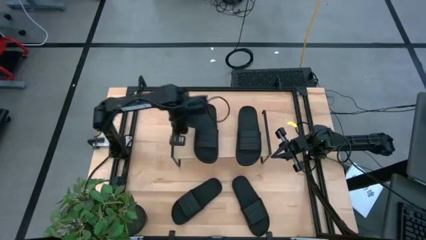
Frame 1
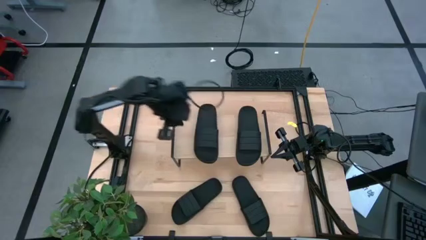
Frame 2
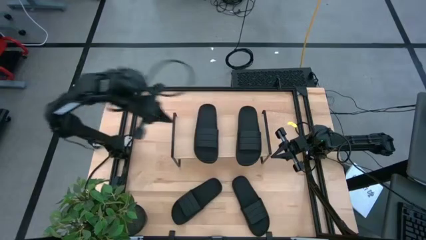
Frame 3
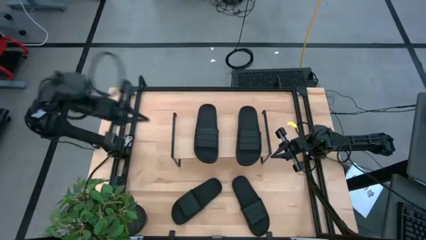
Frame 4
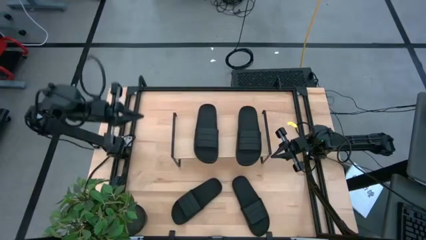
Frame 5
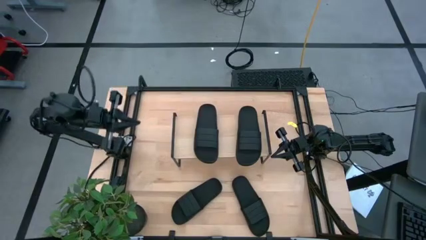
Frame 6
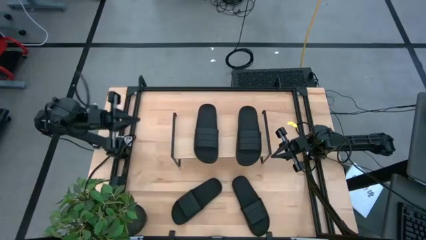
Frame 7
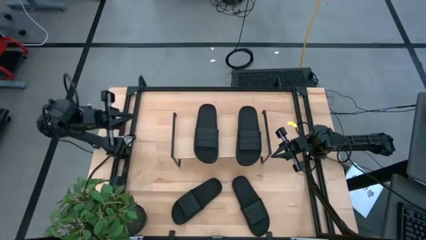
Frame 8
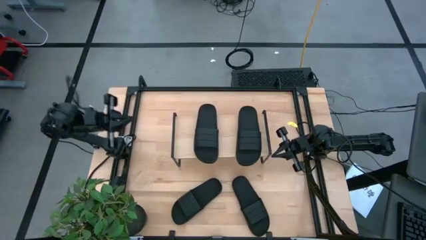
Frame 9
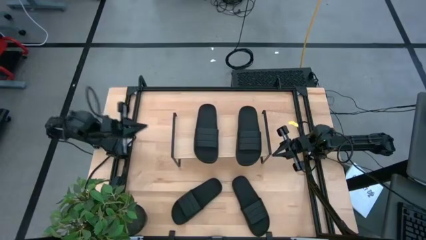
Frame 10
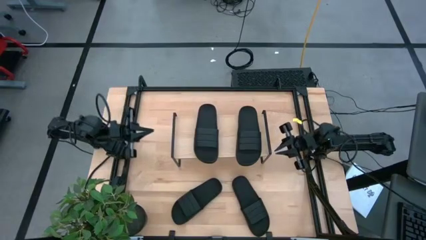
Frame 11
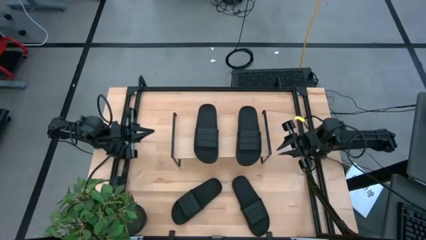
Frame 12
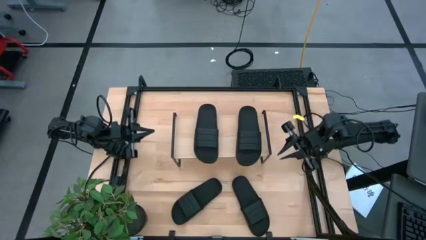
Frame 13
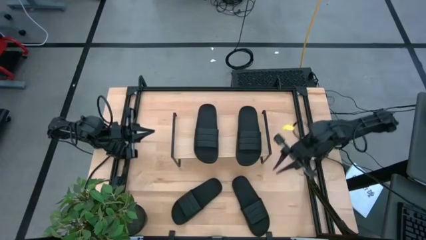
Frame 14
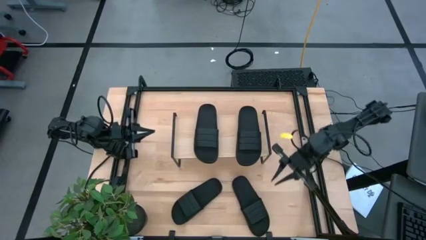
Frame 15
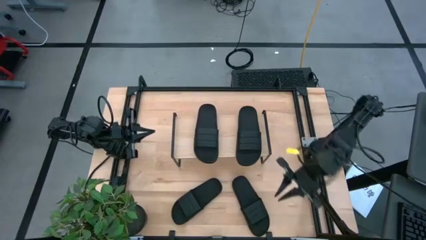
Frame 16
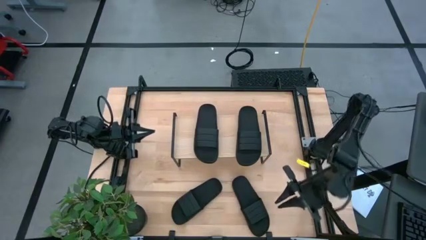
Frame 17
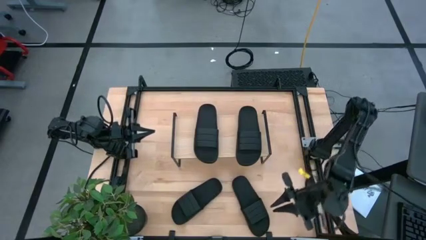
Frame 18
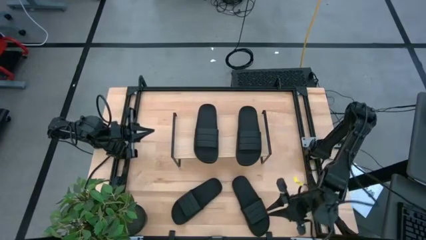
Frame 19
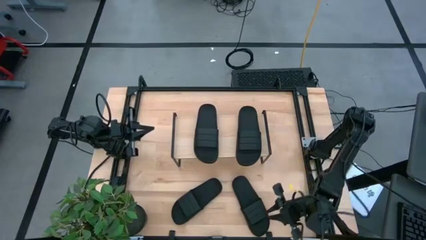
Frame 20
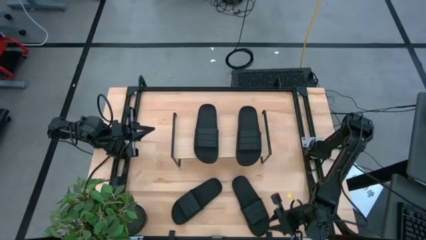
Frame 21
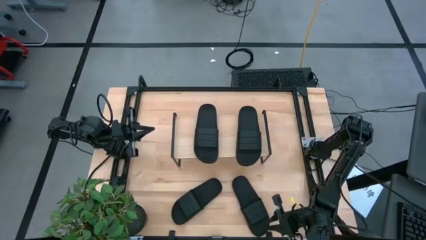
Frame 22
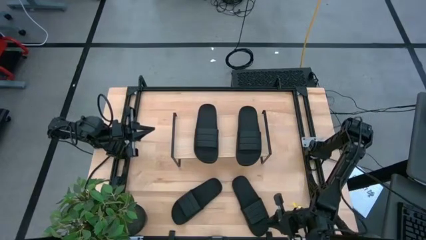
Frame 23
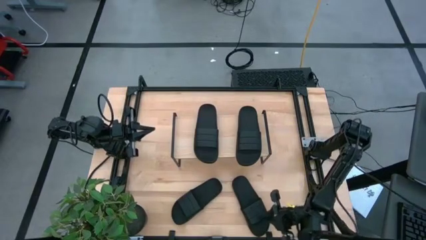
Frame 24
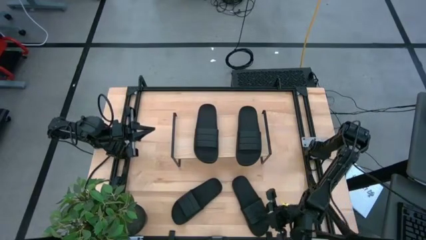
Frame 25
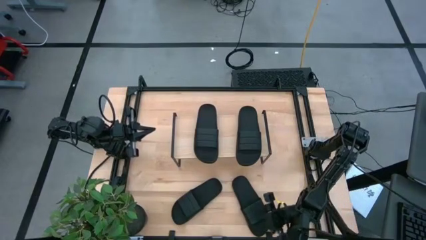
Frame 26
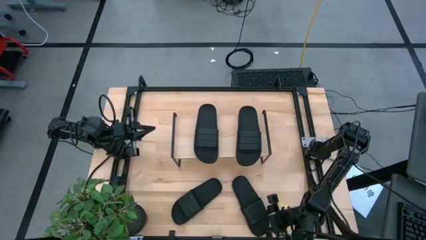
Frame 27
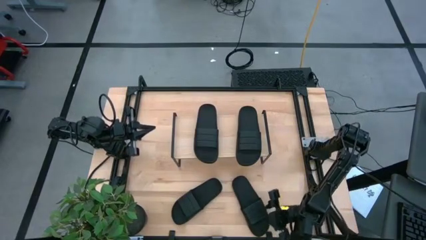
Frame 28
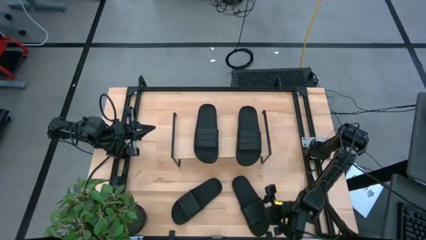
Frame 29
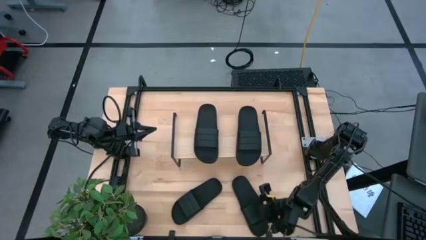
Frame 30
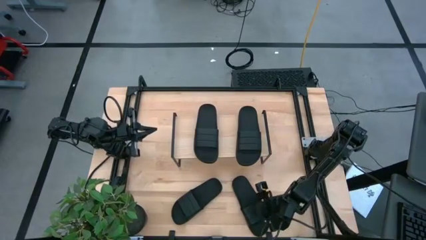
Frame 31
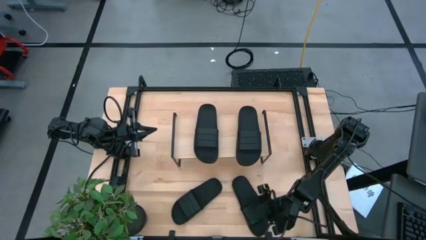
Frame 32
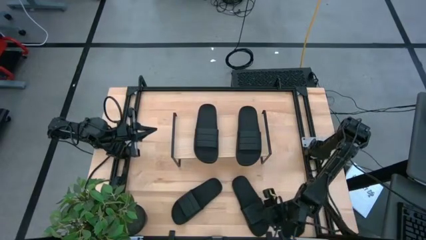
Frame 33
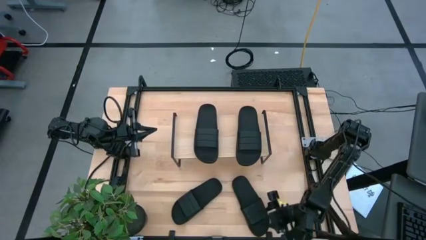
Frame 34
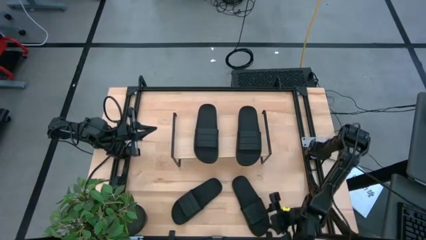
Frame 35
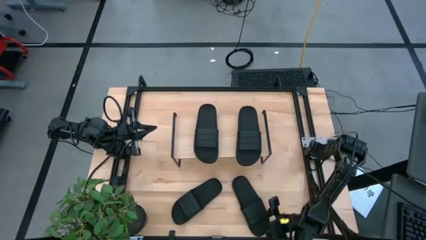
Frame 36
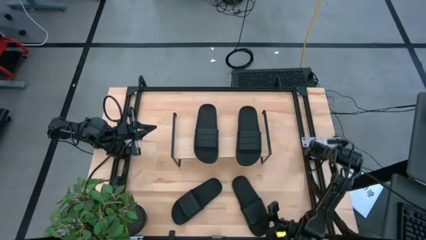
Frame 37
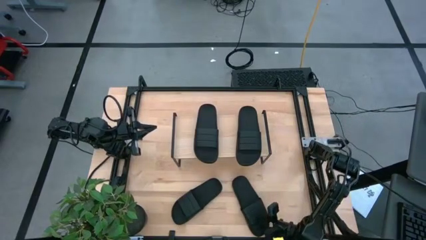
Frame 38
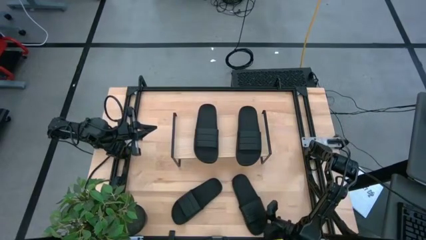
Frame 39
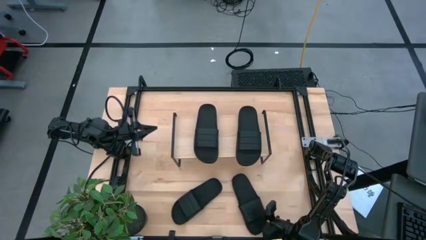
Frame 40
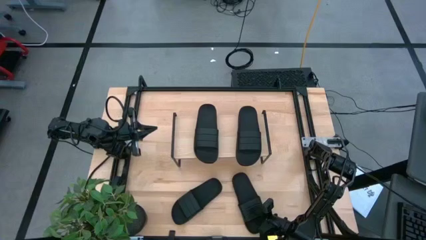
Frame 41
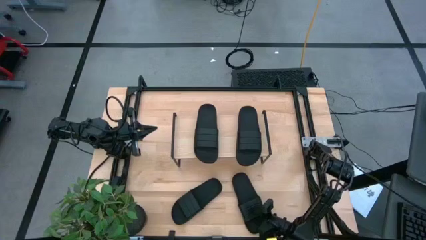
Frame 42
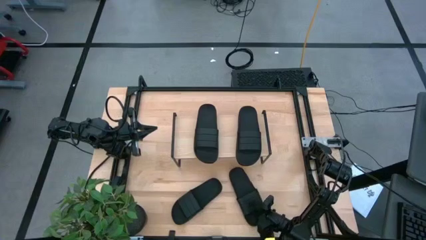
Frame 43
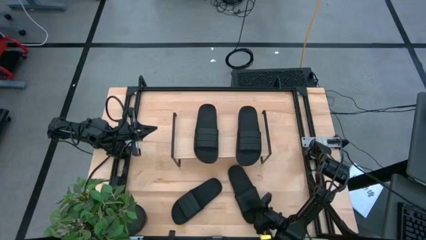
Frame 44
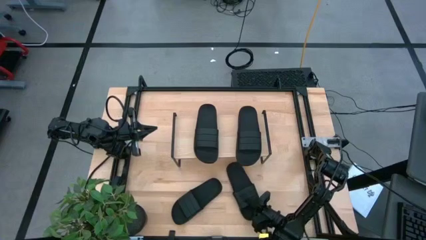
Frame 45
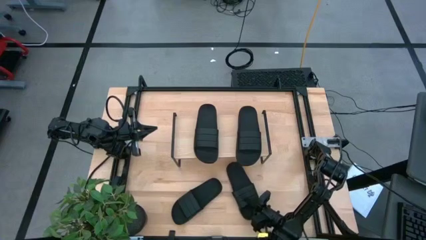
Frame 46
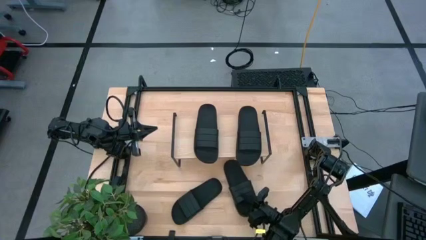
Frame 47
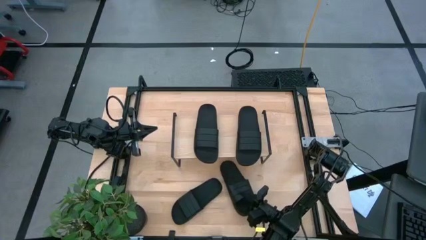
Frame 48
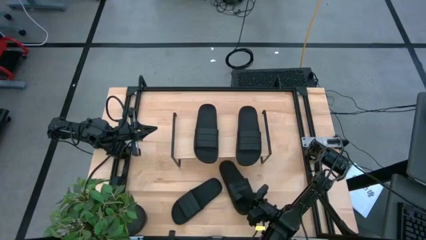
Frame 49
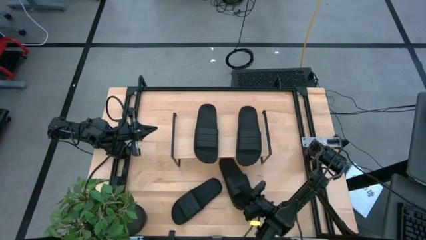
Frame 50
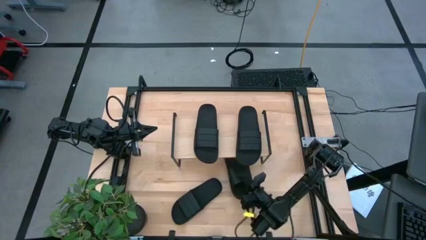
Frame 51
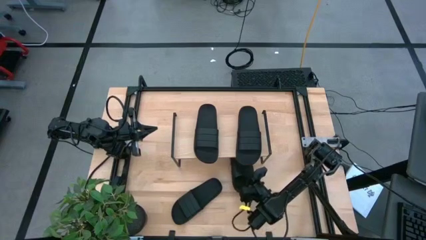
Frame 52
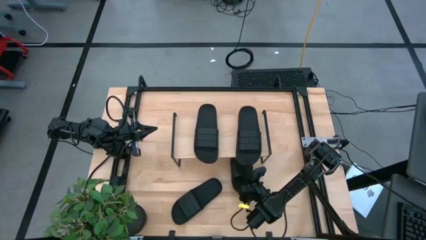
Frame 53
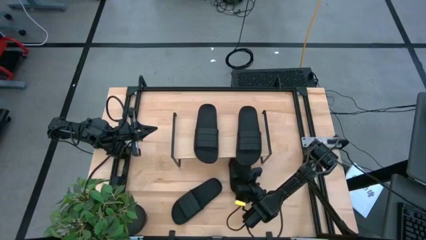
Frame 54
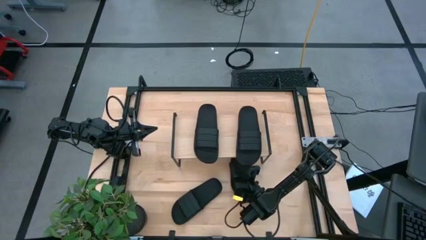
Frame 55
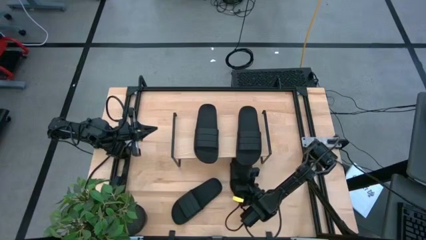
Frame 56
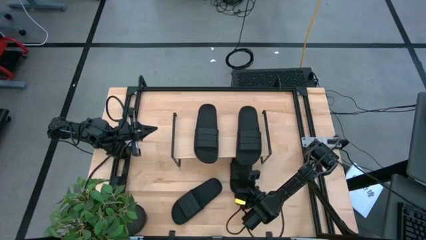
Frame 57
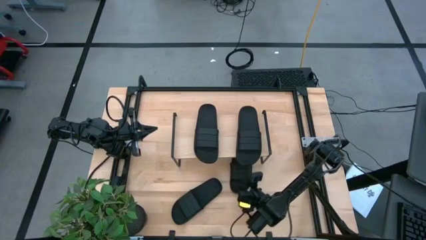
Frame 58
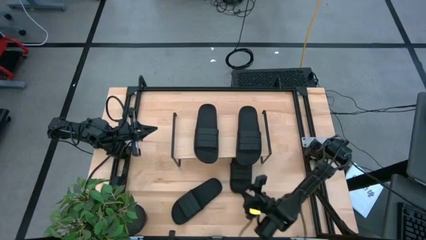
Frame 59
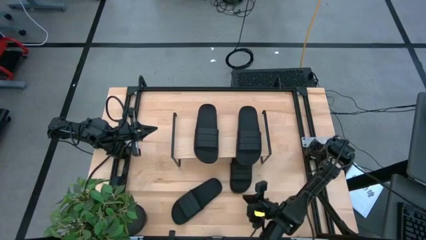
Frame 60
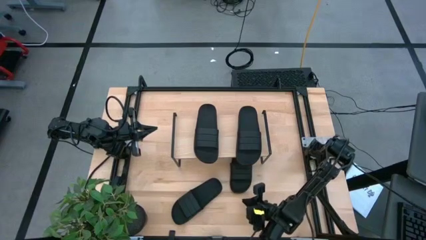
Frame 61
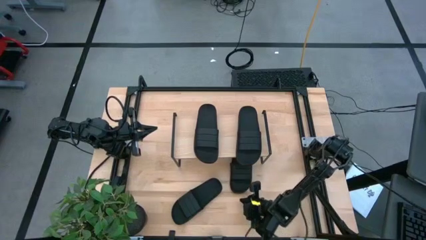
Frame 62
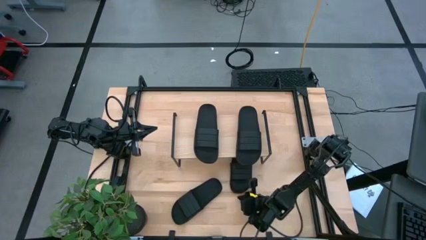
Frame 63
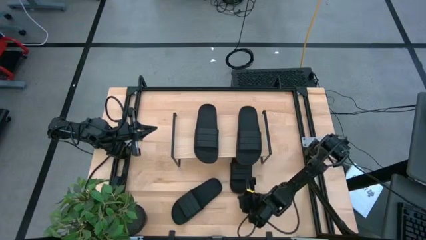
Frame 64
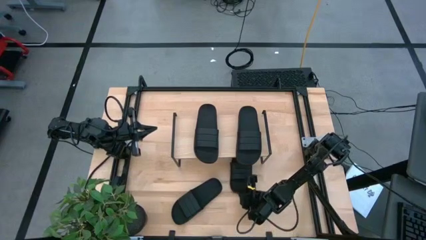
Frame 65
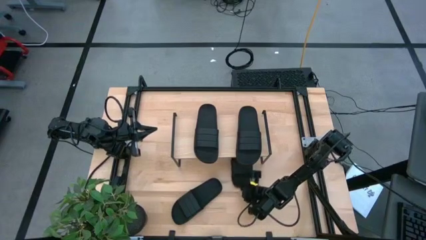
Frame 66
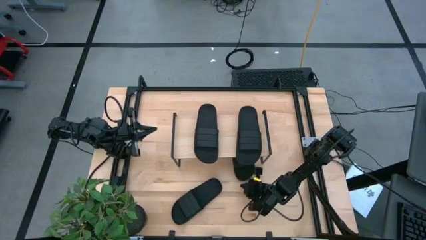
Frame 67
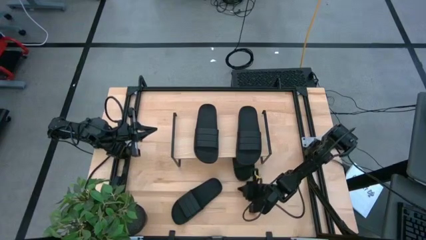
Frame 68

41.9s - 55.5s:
Task: Pick and place slides into the shelf
Put the right black slide under the shelf

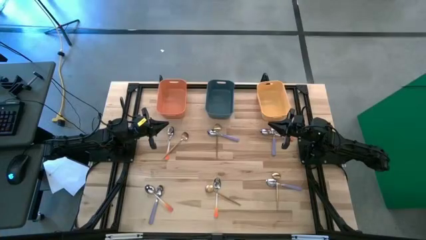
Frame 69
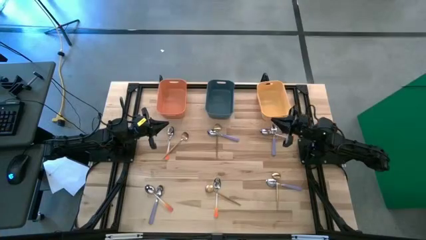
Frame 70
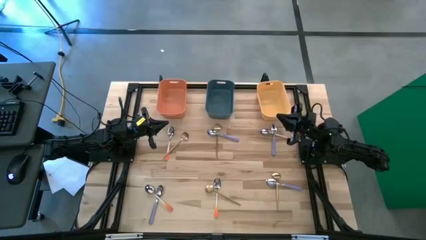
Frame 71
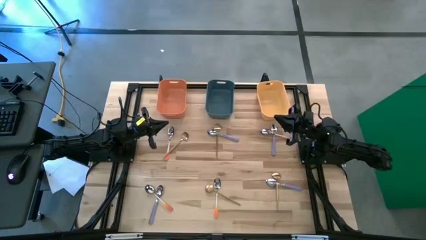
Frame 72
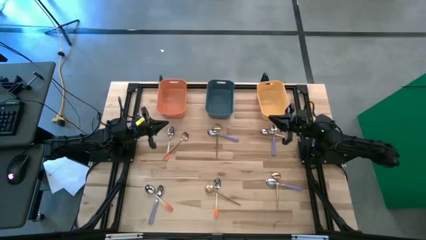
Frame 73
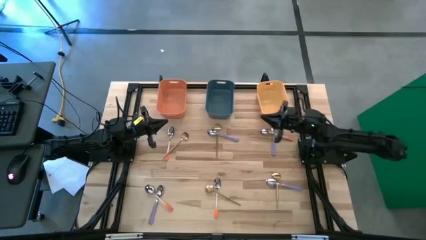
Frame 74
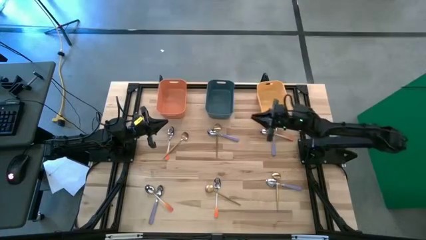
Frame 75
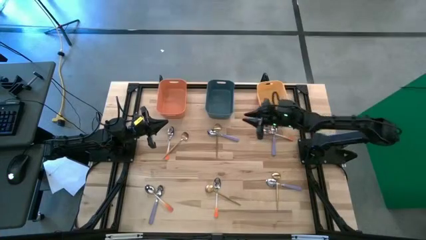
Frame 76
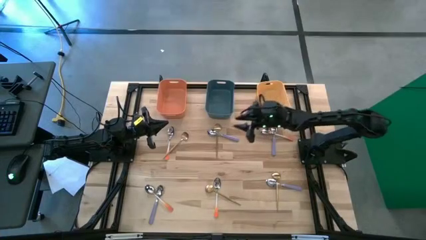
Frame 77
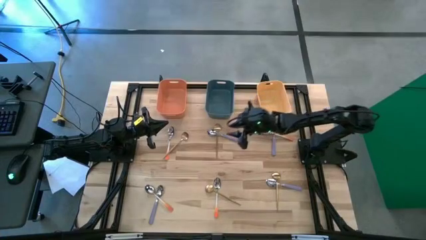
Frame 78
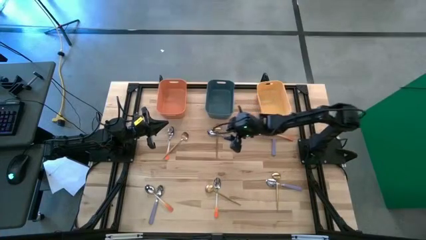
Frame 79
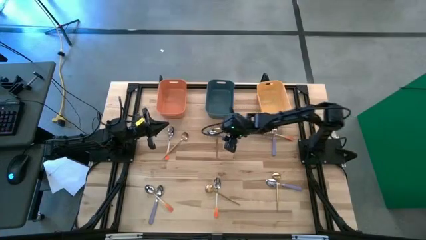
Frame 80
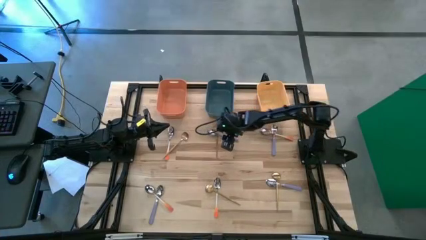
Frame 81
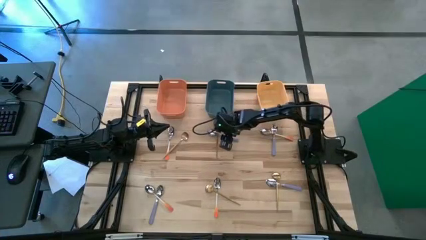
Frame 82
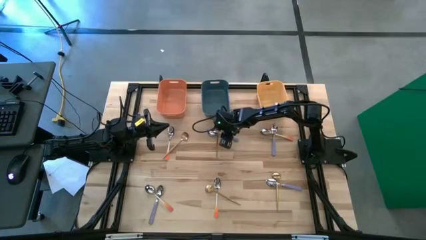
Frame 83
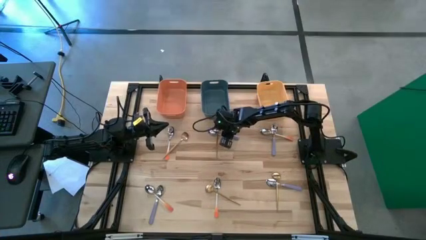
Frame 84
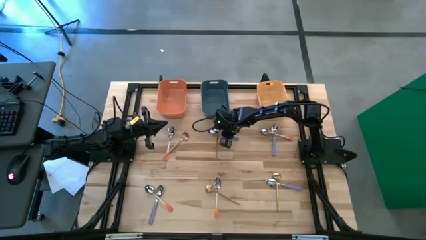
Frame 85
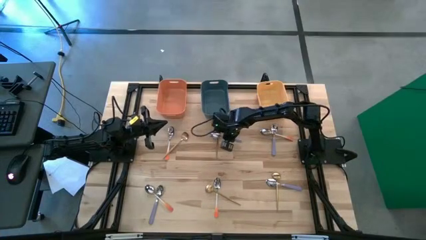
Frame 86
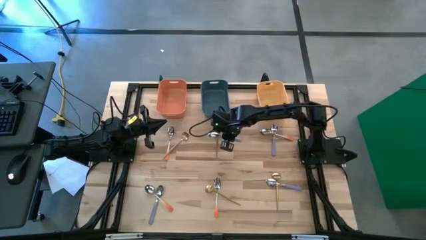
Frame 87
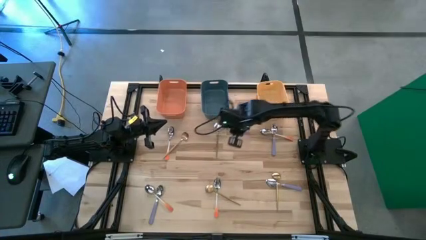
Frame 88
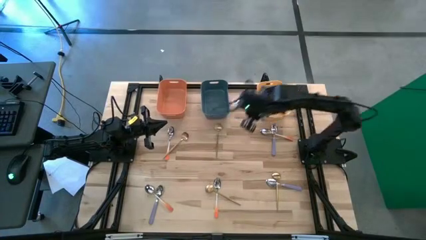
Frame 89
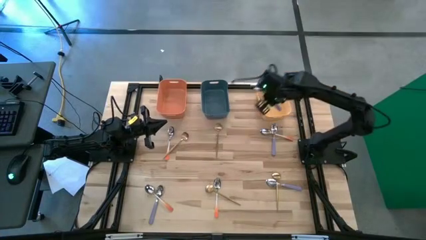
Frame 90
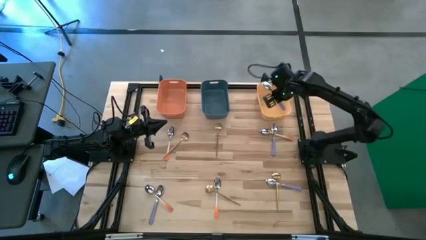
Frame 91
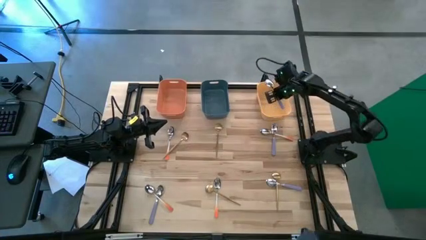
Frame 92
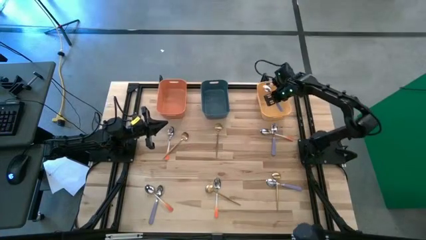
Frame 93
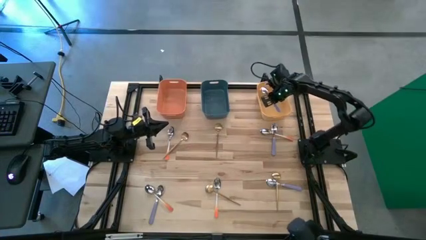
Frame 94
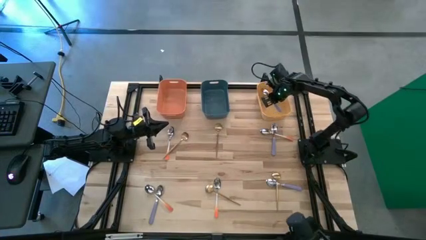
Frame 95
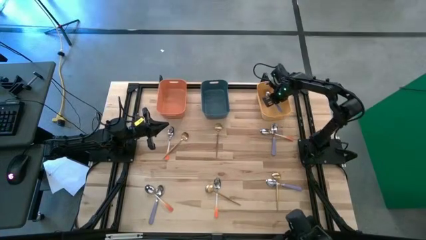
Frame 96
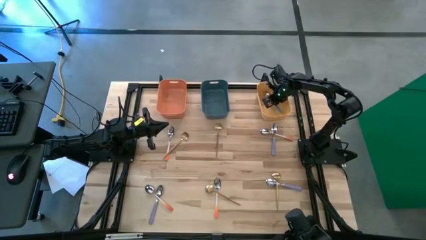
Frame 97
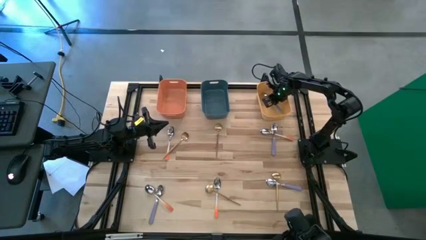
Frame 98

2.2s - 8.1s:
Task: Sort silverware by color (type)
Put the purple spoon into the yellow bin
